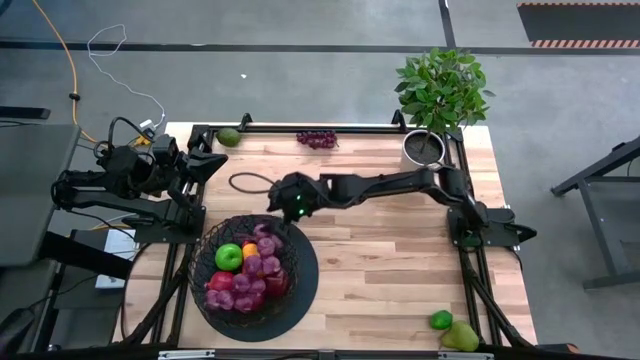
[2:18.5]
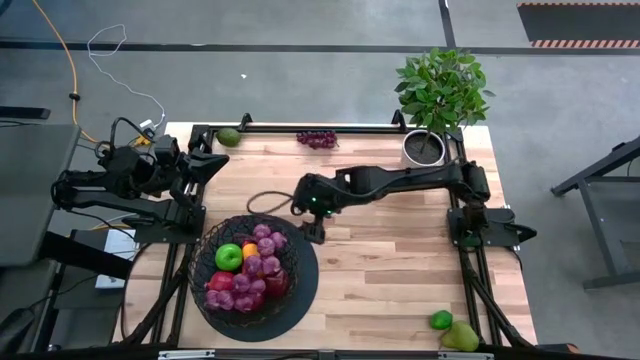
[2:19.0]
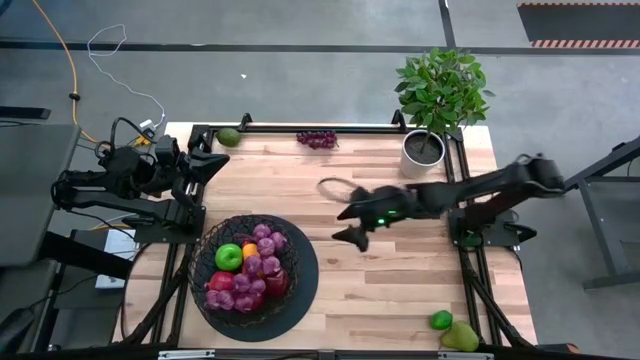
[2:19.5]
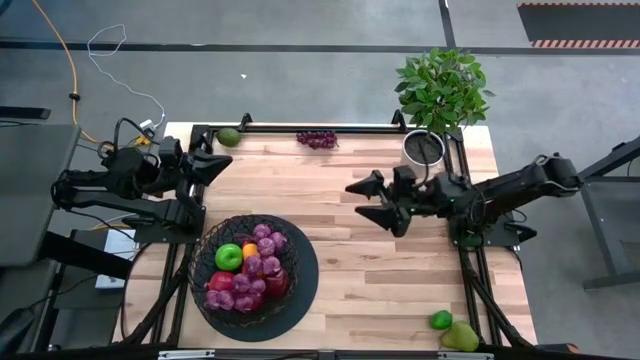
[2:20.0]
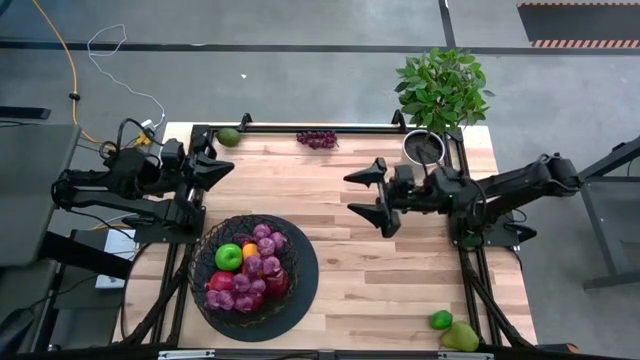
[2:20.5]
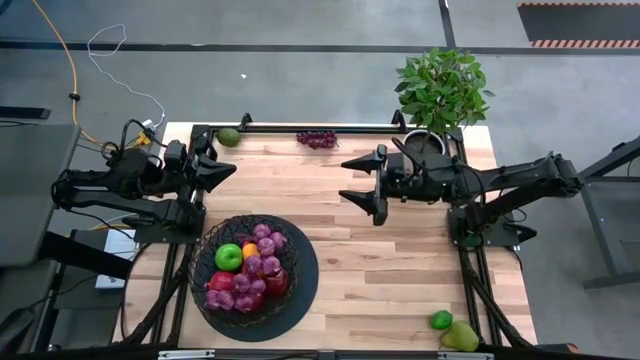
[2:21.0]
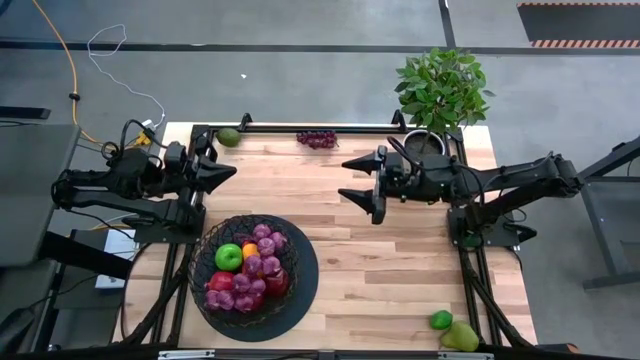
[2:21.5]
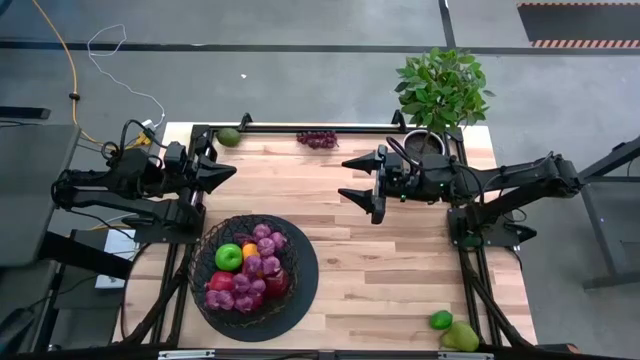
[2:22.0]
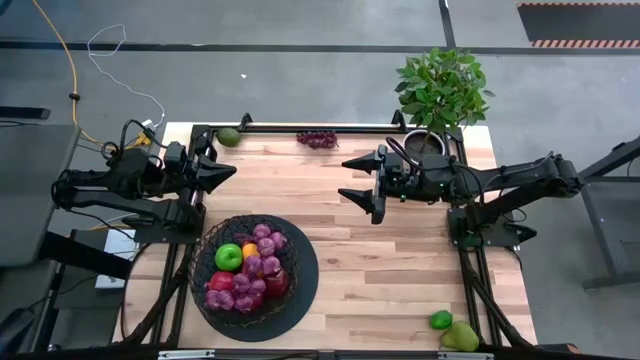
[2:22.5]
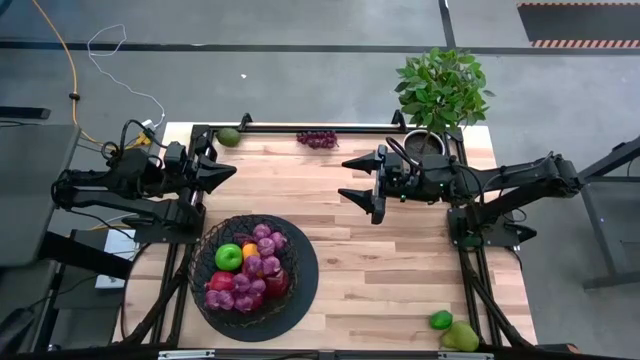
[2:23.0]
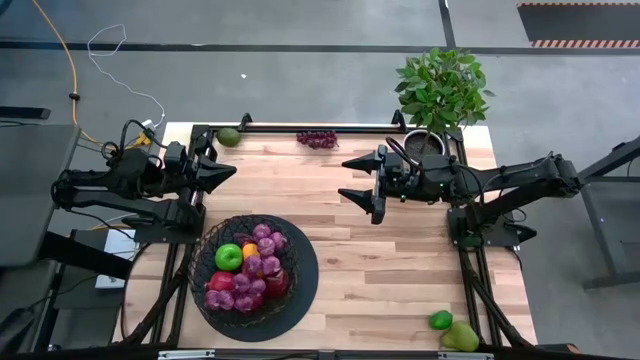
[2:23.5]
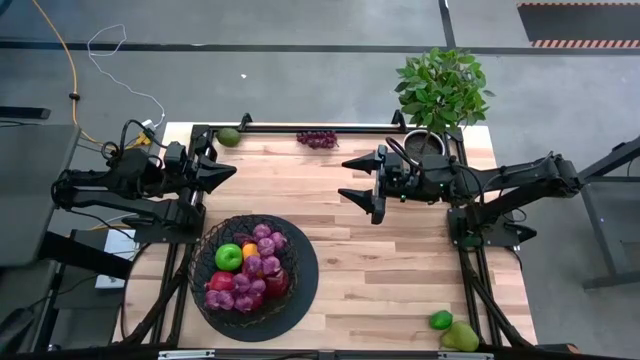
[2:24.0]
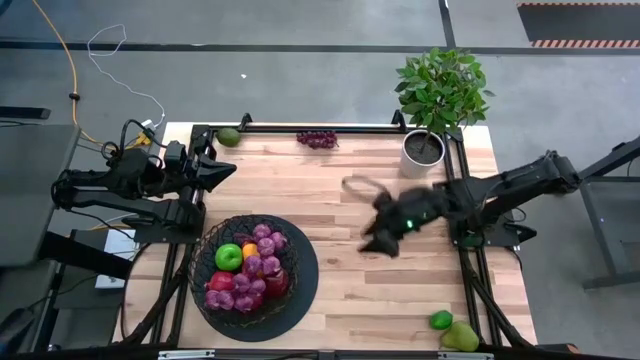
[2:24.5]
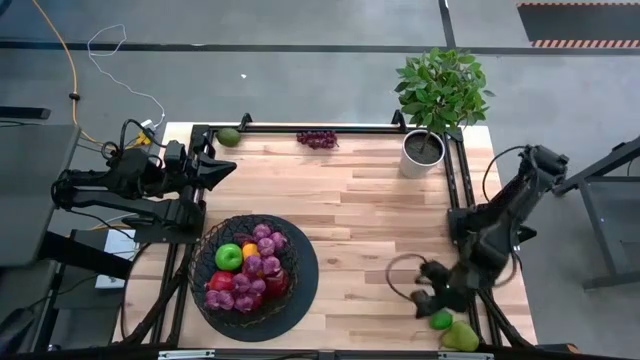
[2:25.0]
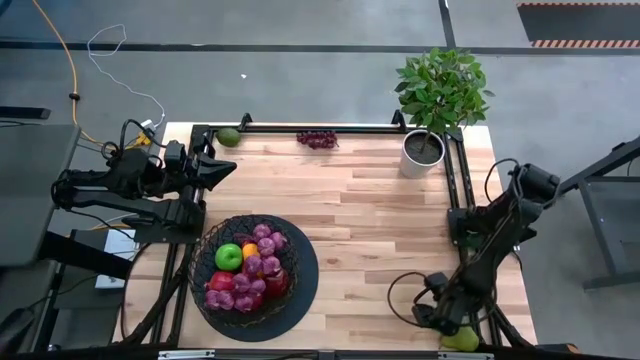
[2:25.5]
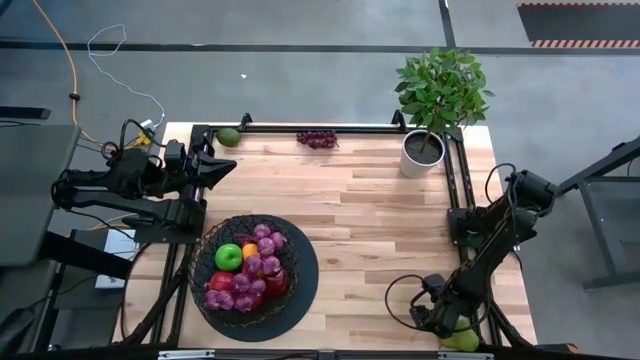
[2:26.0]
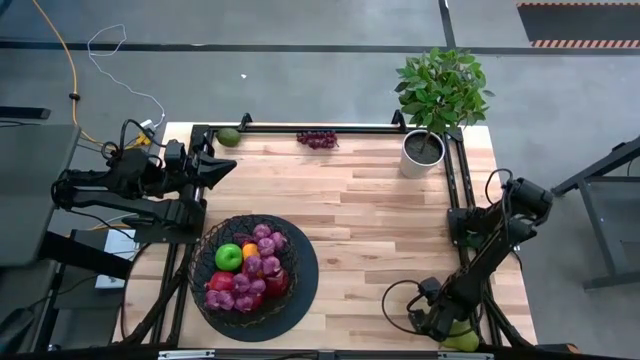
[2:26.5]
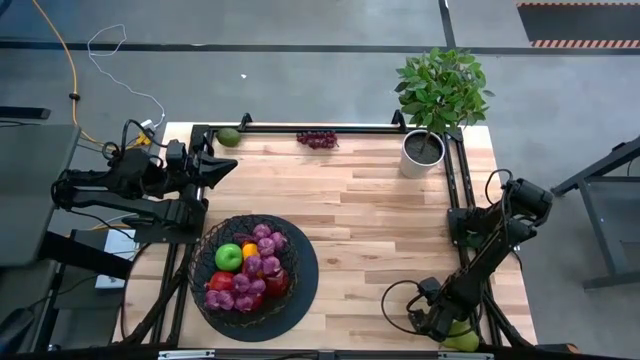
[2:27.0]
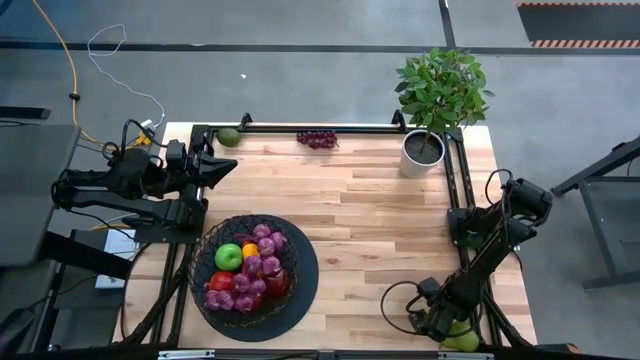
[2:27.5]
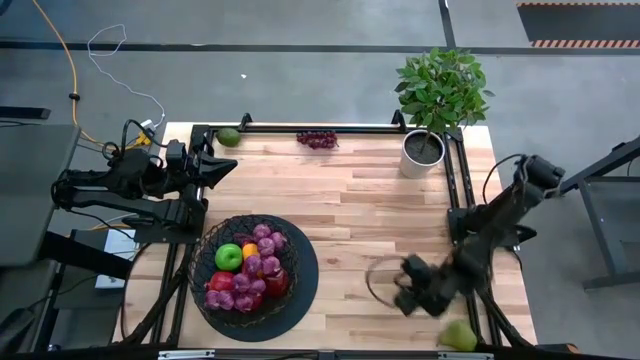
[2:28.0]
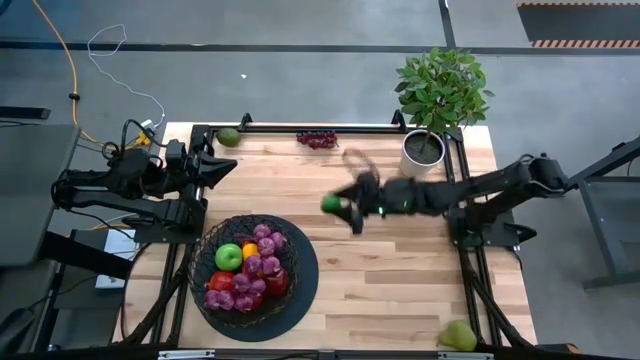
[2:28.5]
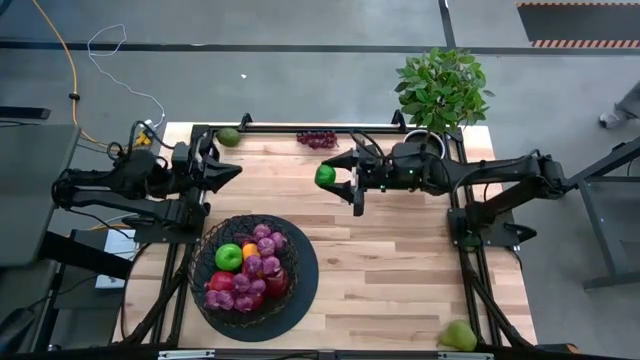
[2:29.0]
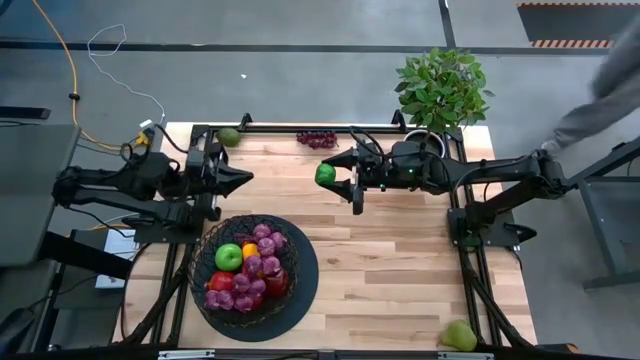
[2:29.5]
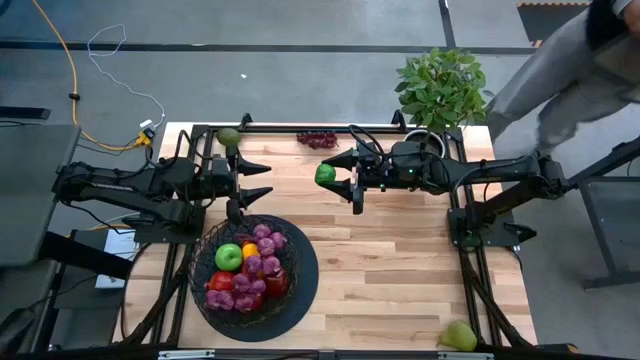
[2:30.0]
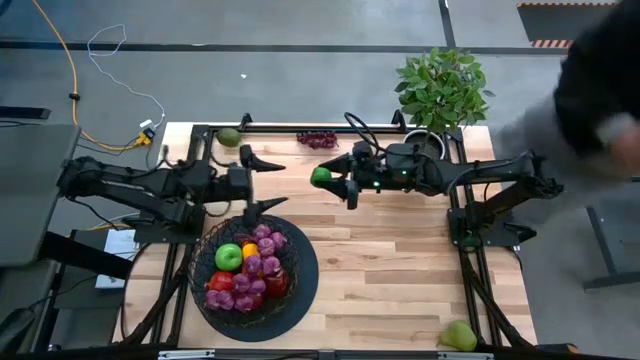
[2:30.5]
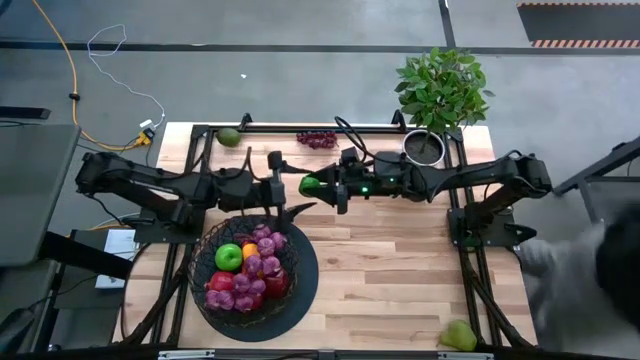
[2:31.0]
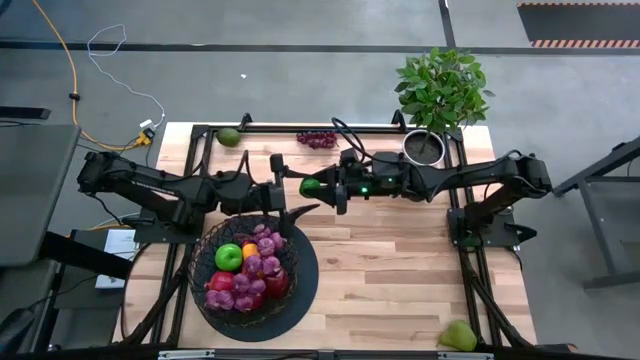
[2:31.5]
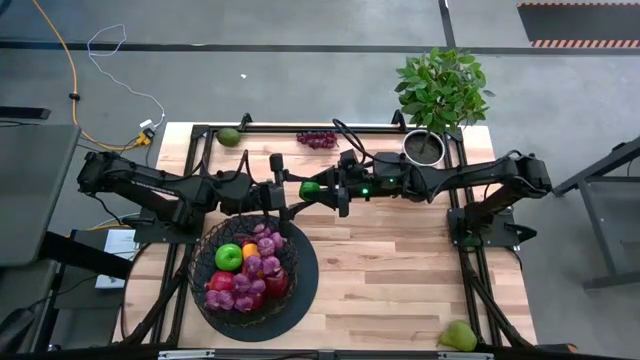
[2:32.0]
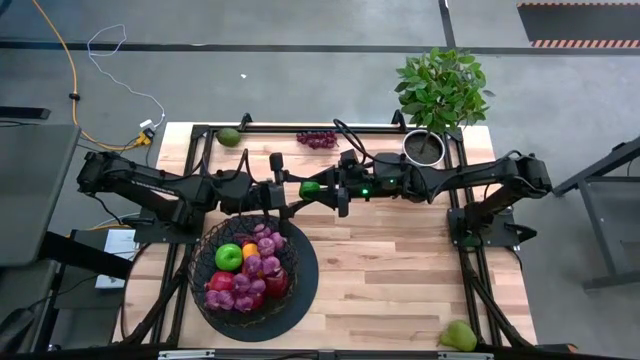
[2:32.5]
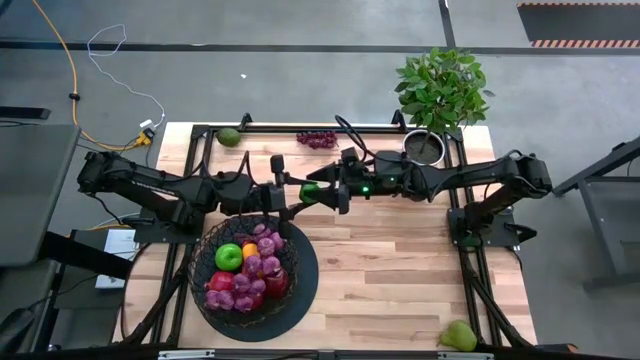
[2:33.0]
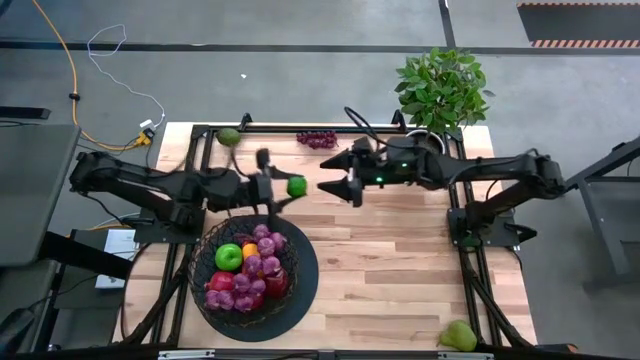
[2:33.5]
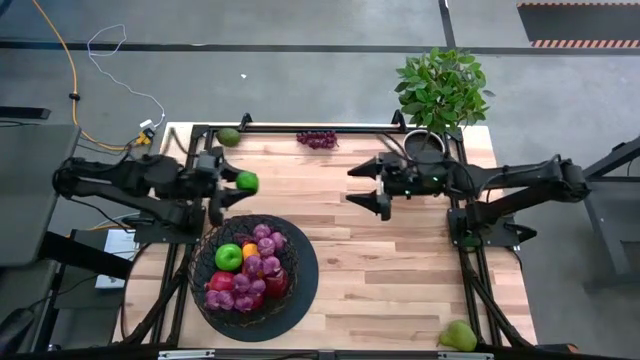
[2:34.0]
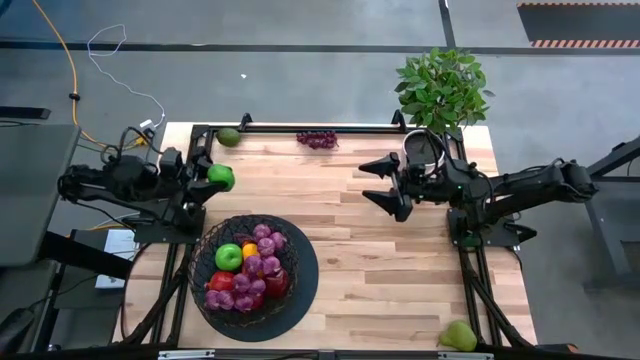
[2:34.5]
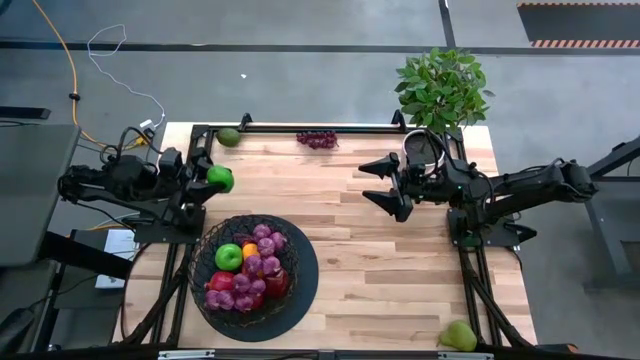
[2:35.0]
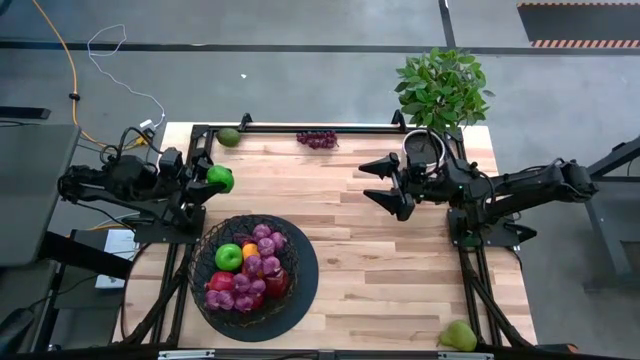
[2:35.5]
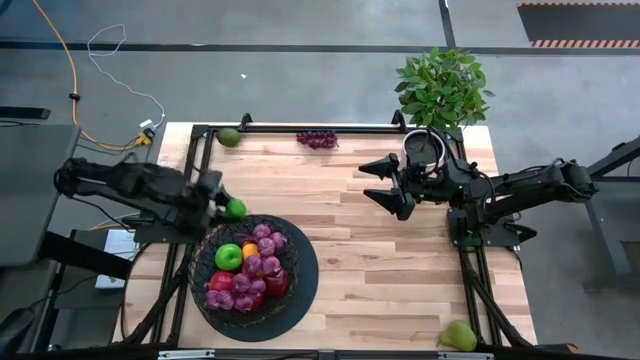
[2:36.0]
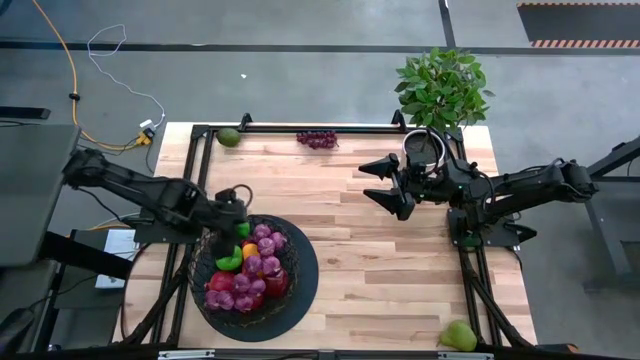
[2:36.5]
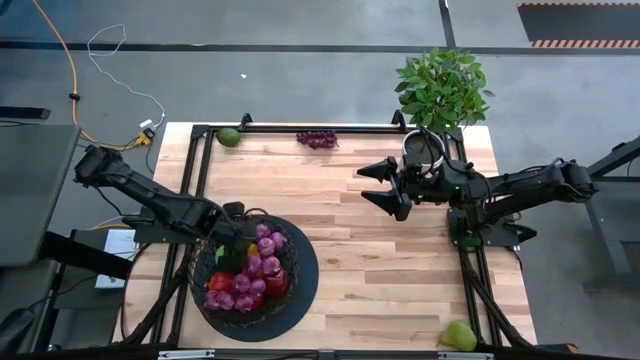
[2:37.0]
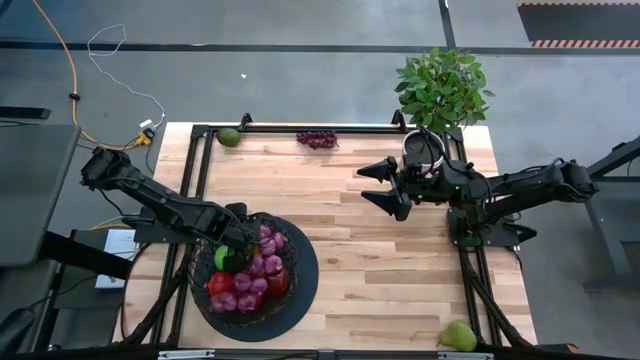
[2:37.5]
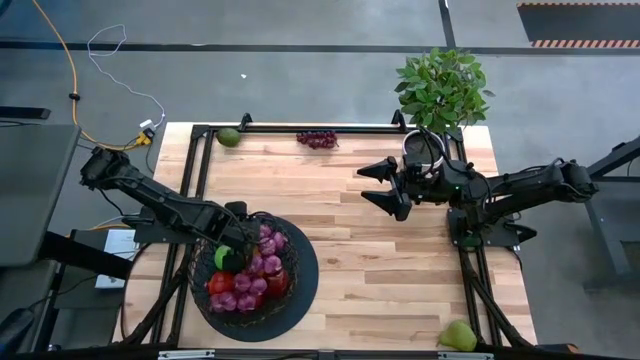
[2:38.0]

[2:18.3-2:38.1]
Task: Build produce basket
Put the bottom lime into the black basket

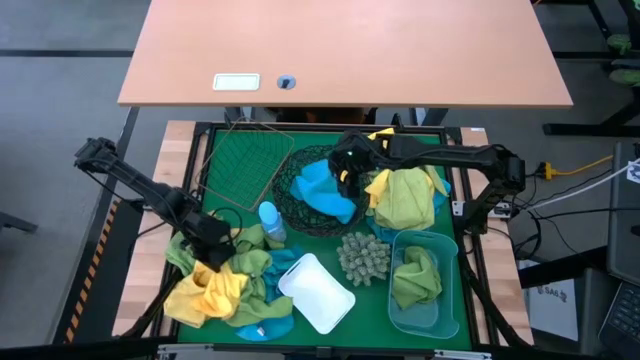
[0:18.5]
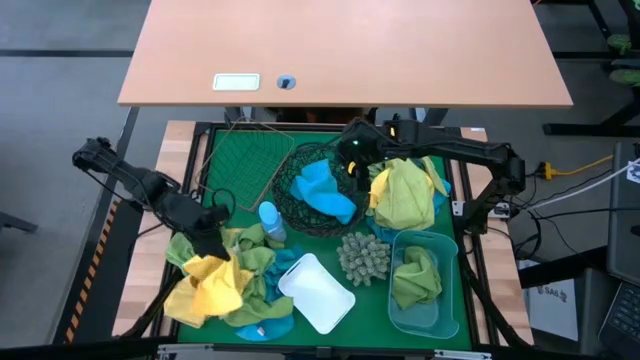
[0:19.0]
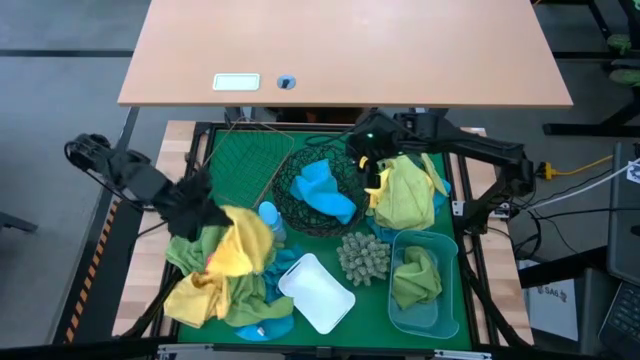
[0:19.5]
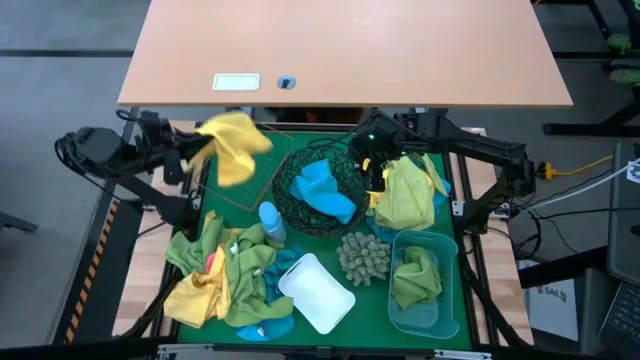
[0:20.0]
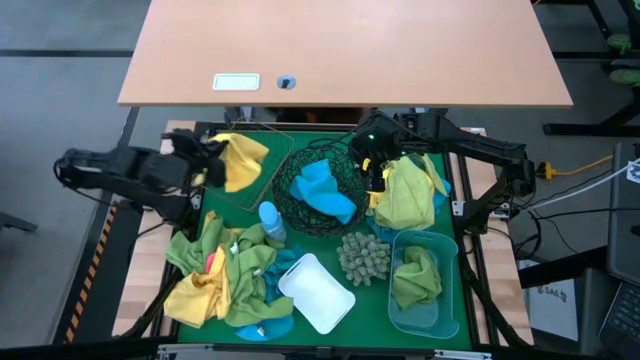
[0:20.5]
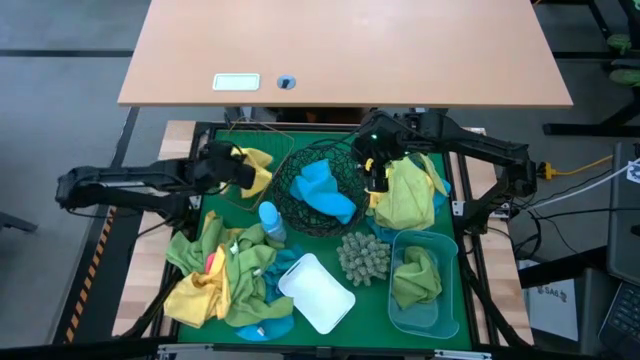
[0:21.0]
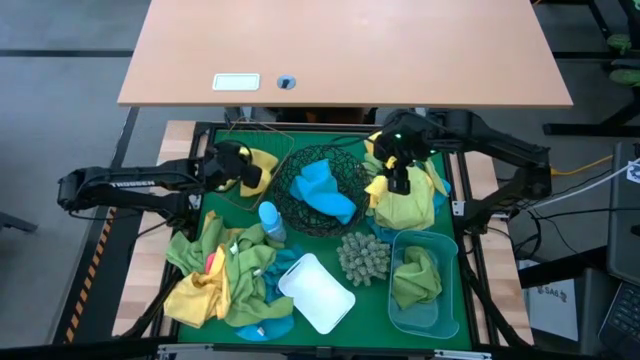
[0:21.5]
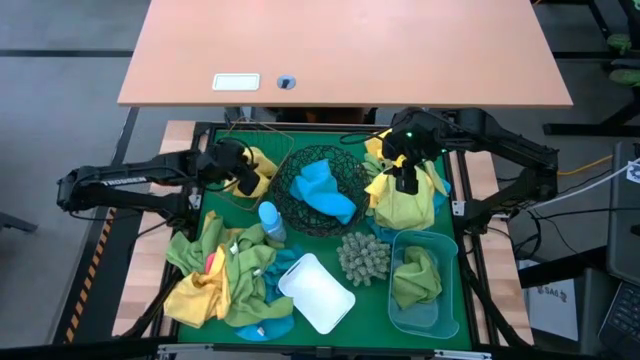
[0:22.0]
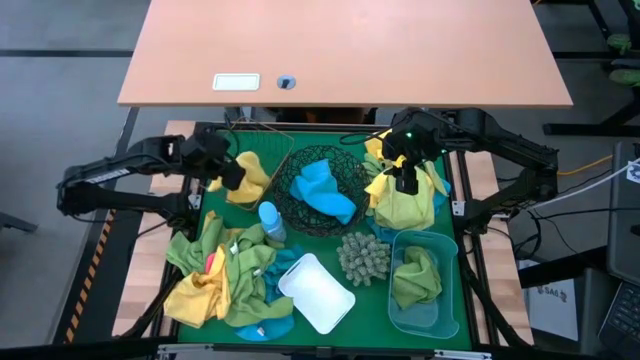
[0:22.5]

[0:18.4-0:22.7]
Task: Sort microfiber towel by color & place in baskets
Put the yellow microfiber cloth into the rectangular wire basket
